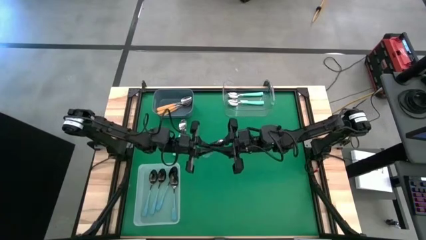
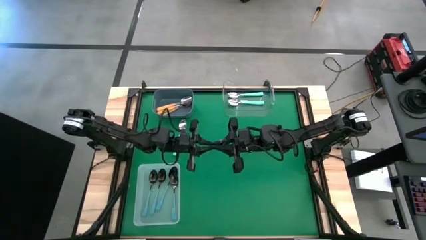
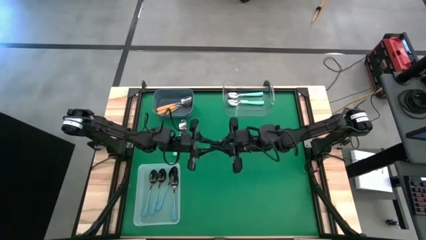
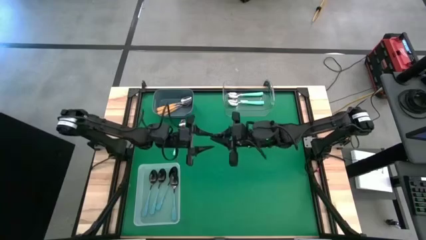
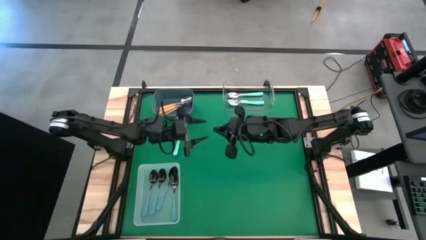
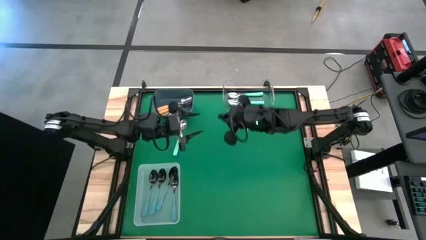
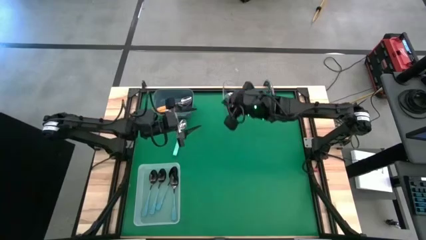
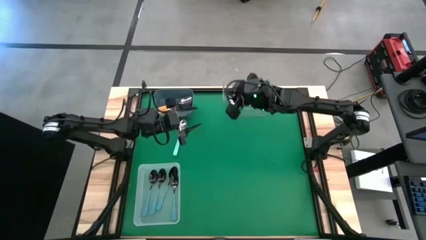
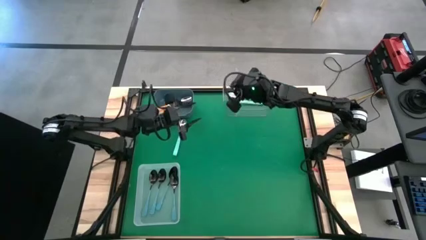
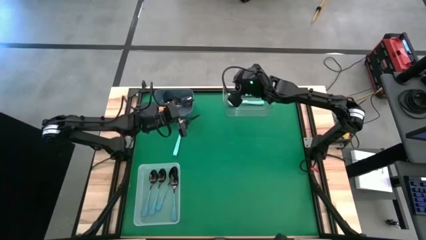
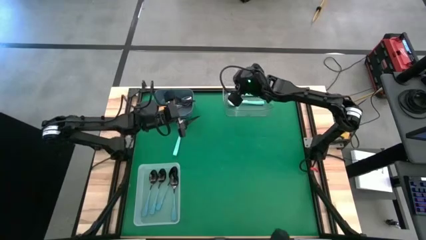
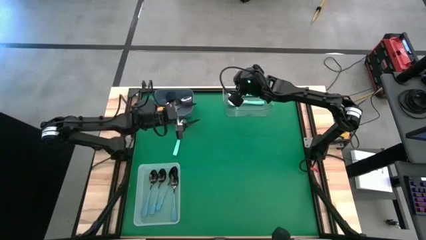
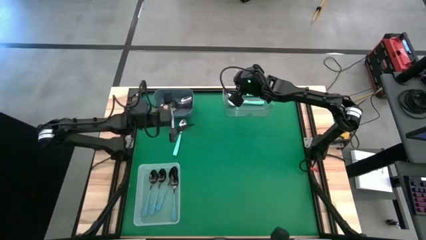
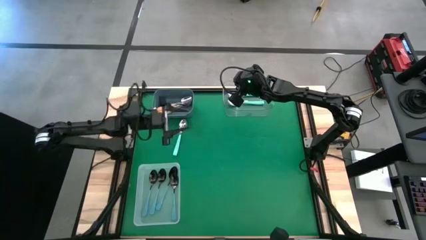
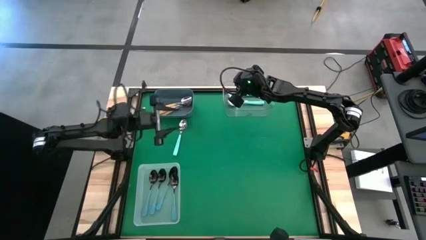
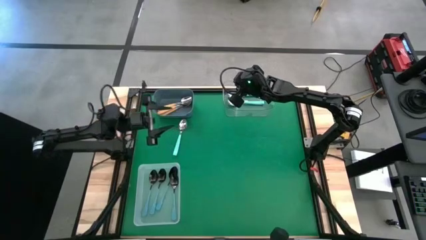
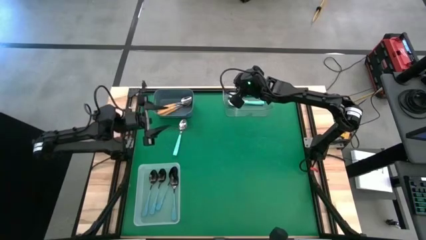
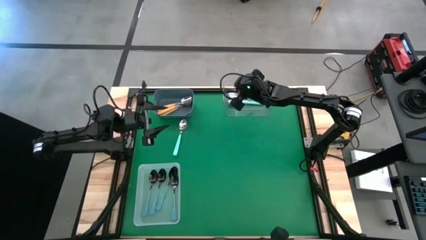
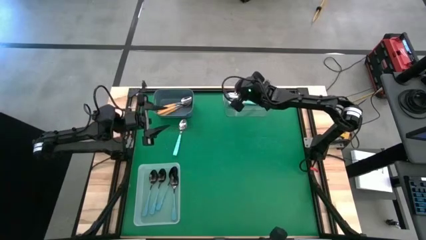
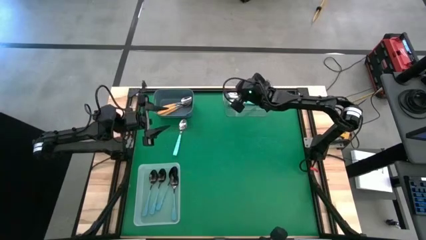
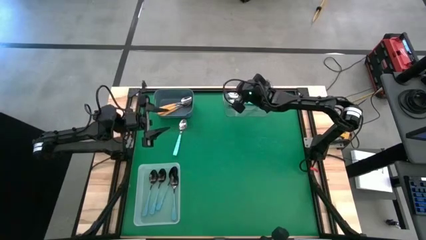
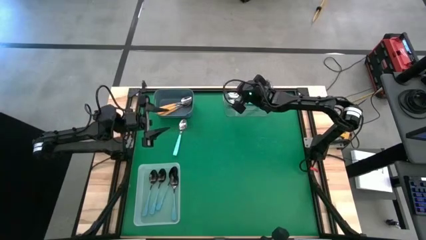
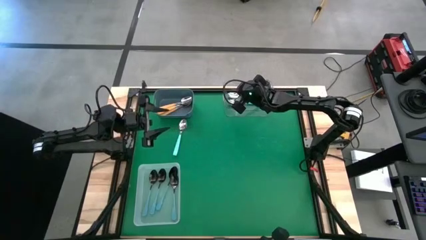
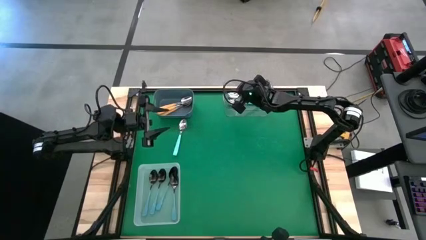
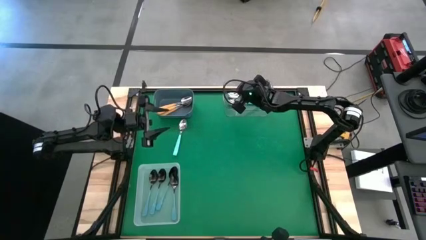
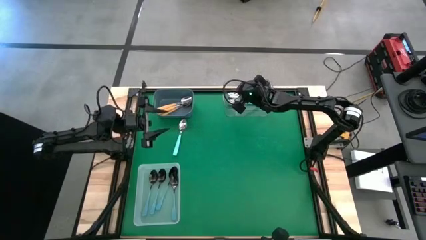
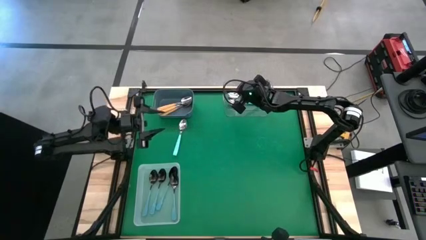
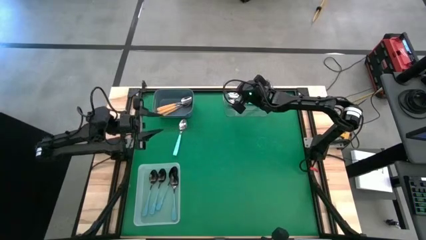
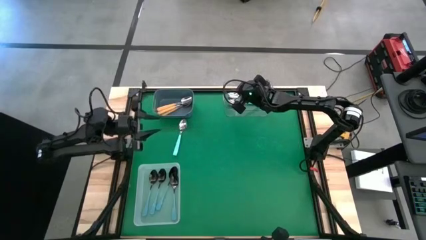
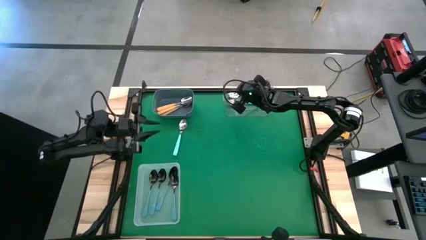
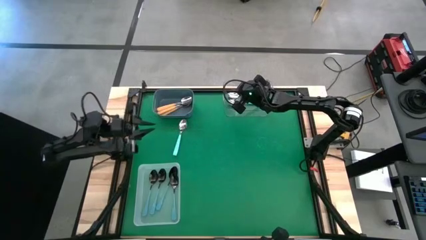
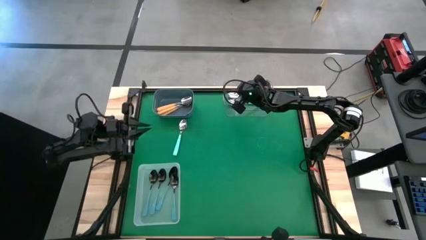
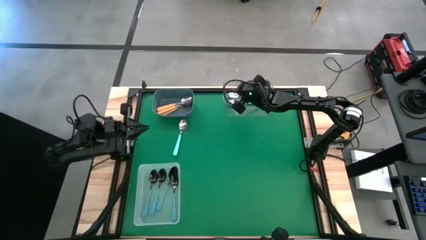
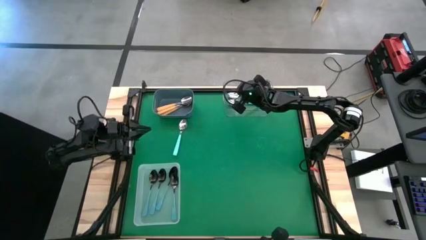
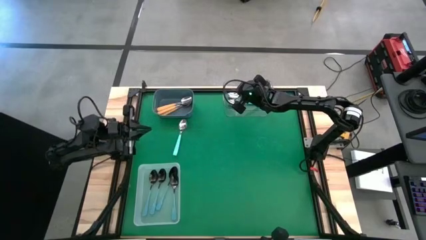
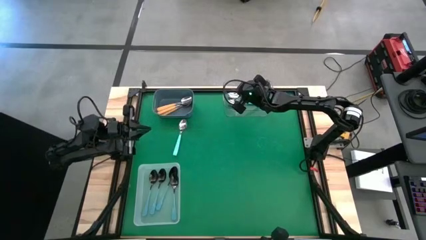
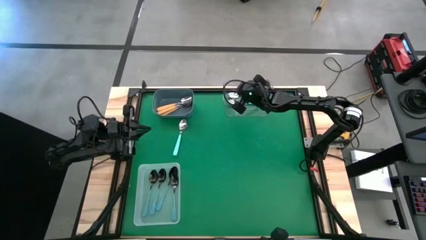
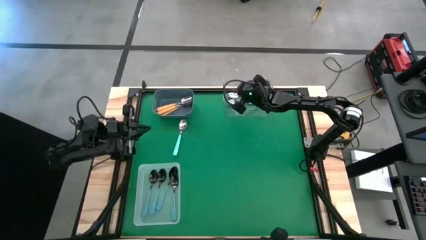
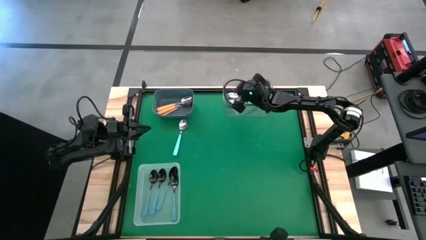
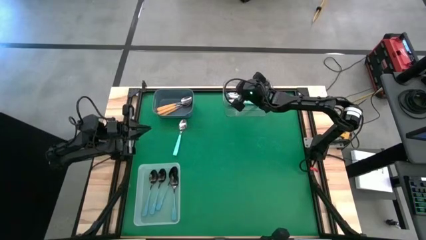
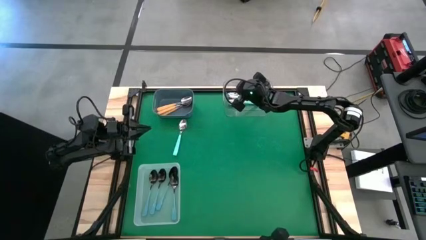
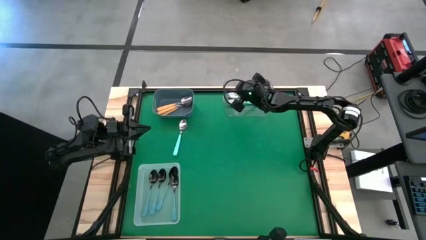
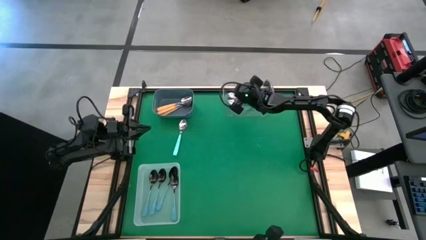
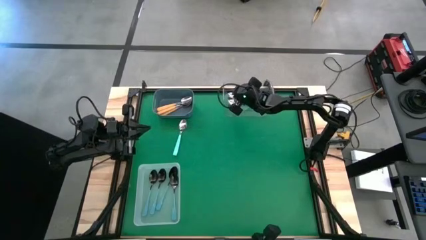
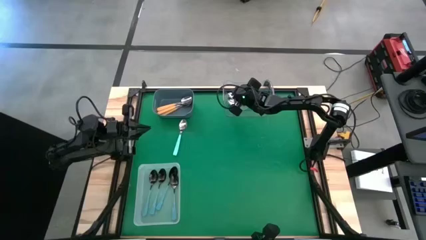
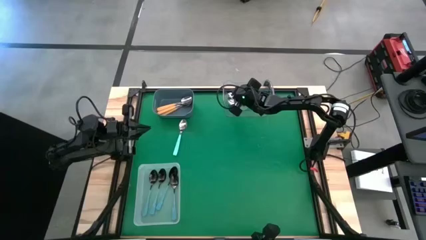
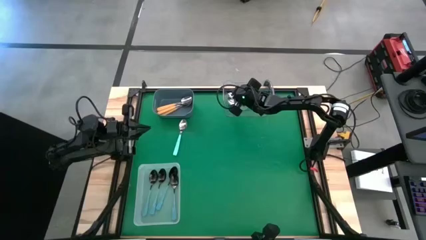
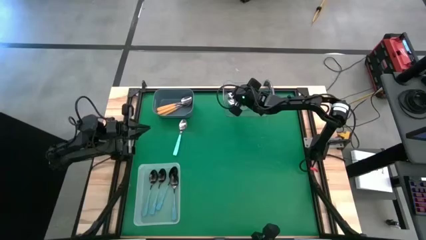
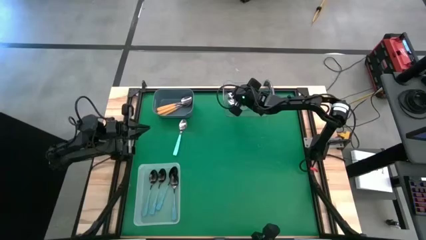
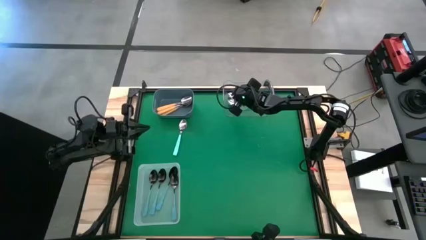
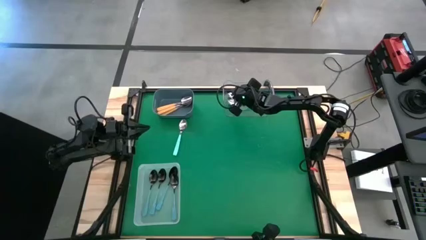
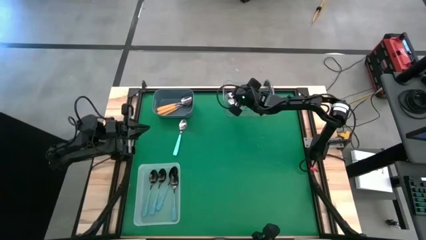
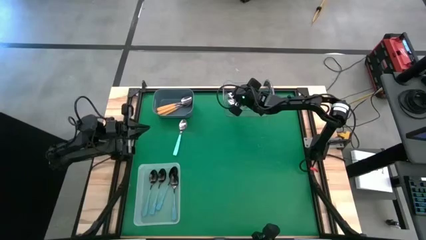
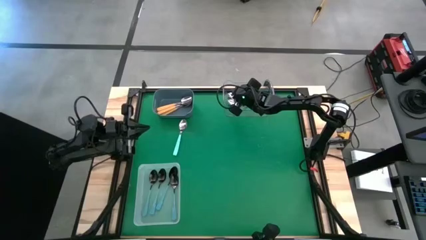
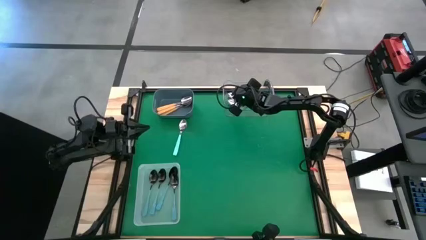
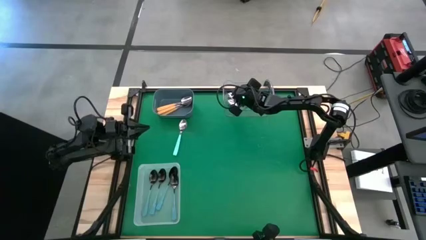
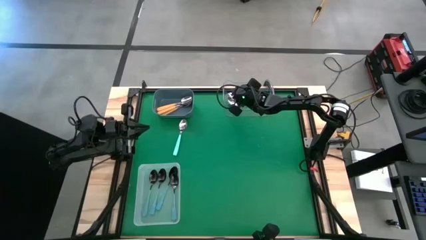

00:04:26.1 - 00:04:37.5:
Task: Sort silverware by color (type)
Put the light blue spoon into the transparent bin

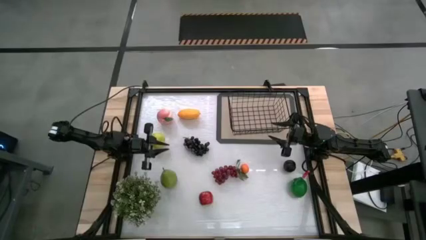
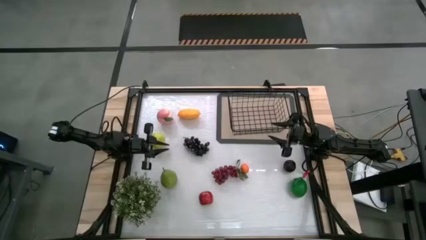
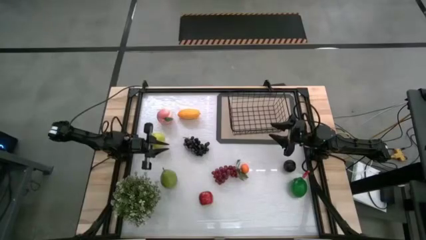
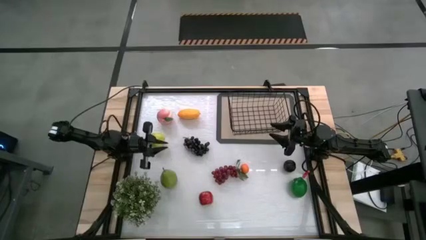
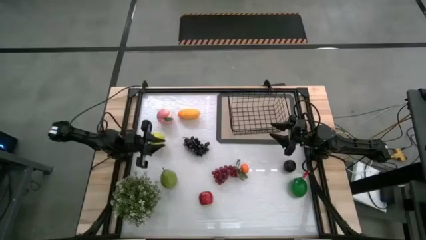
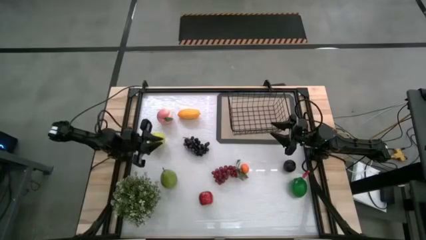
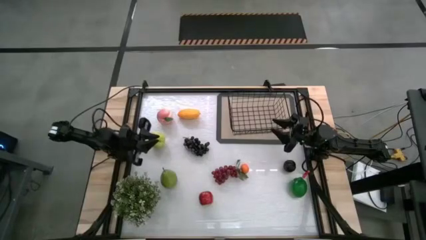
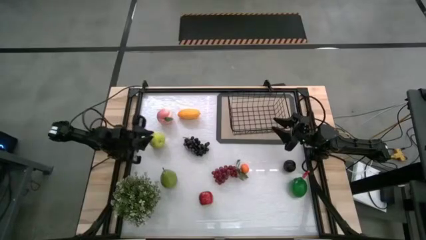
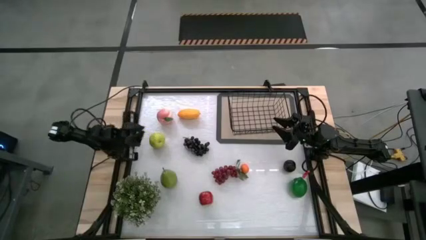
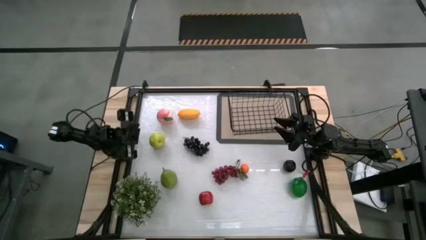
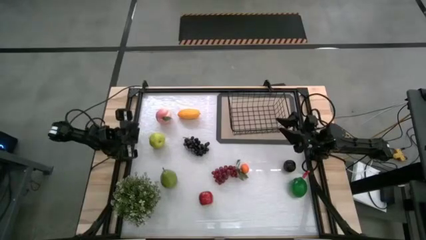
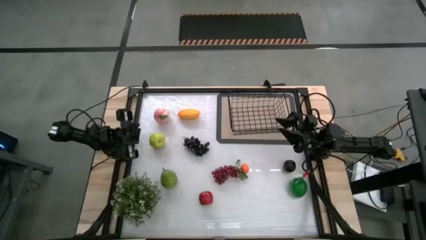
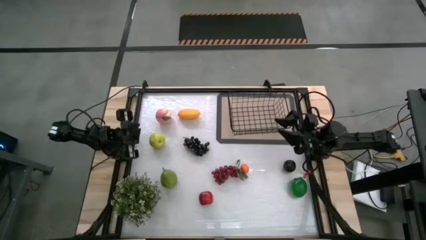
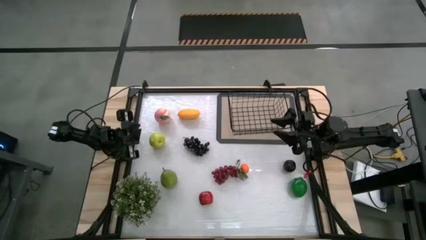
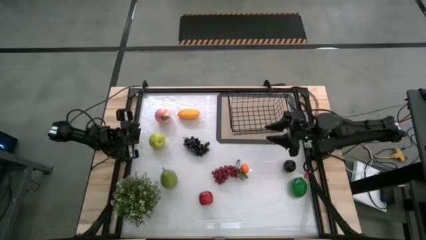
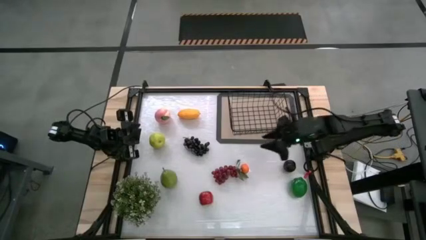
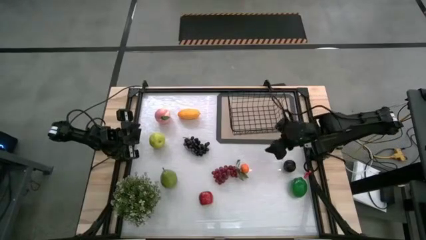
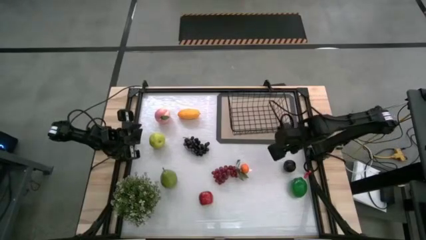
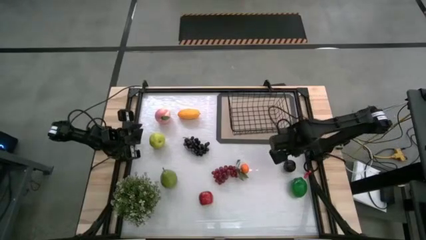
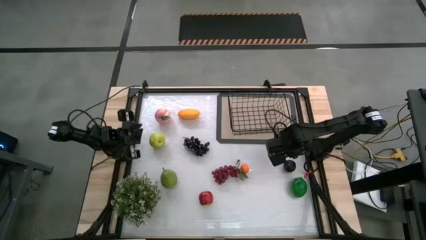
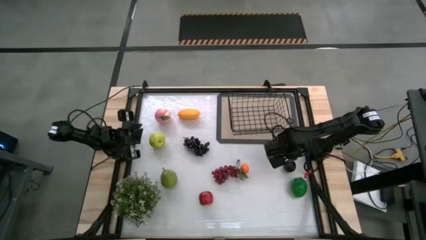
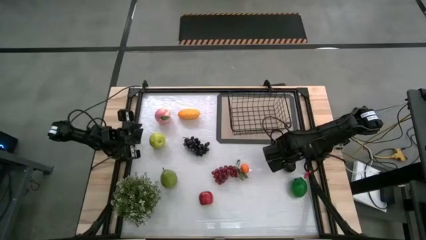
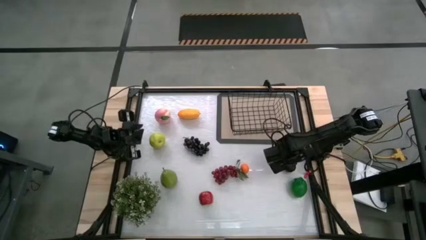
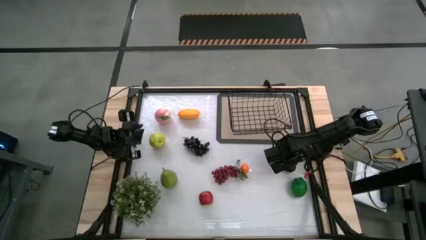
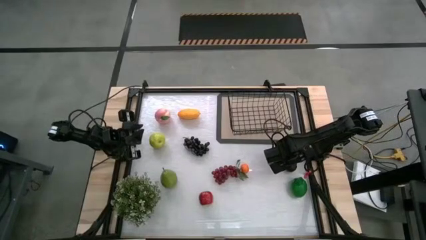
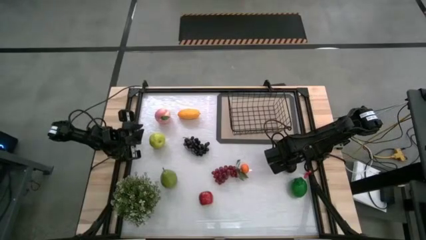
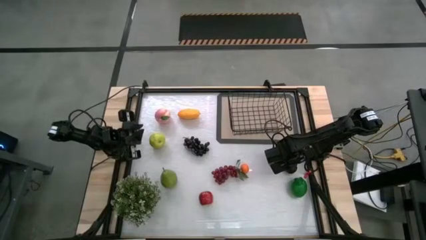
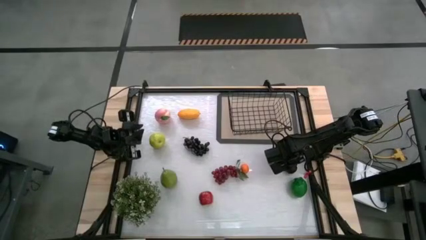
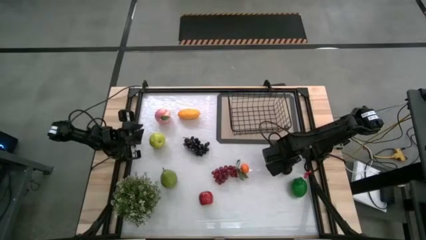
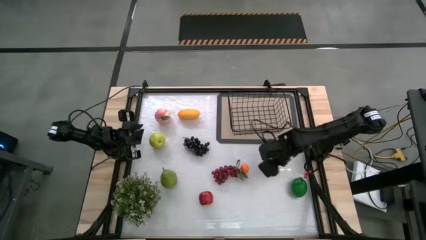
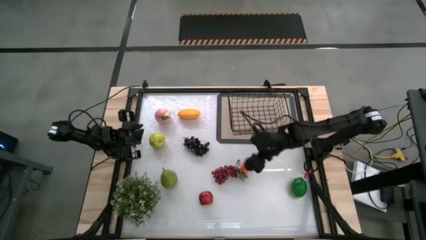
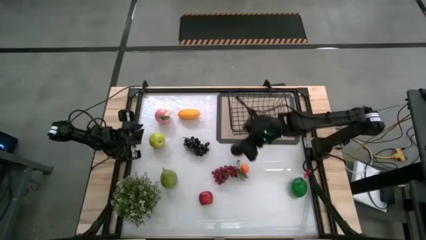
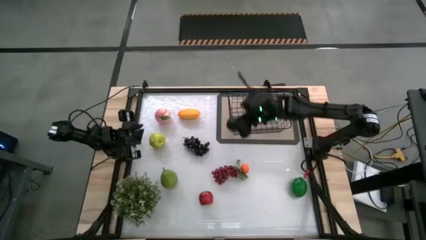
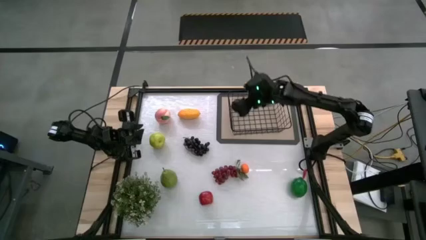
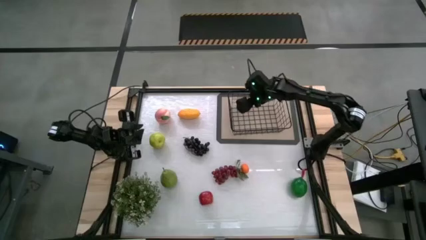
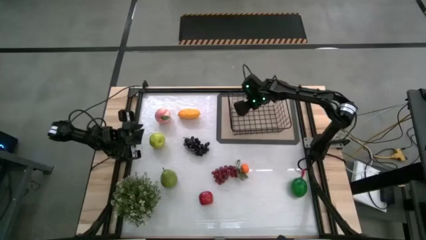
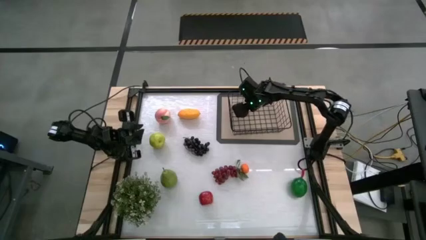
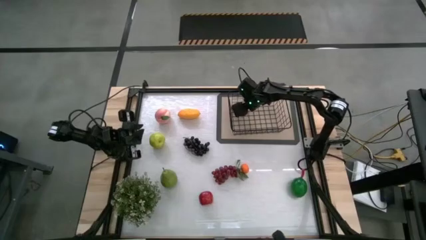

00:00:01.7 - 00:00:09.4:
Task: Build produce basket
Put the black plum into the black basket
